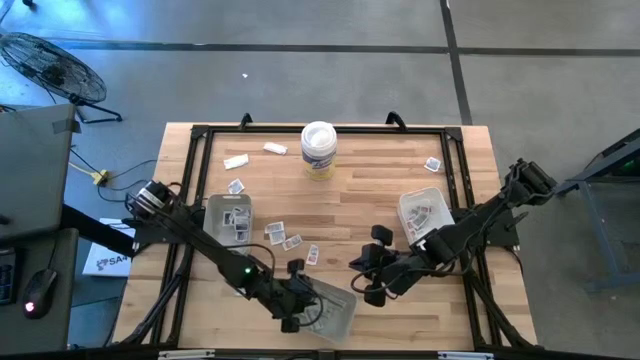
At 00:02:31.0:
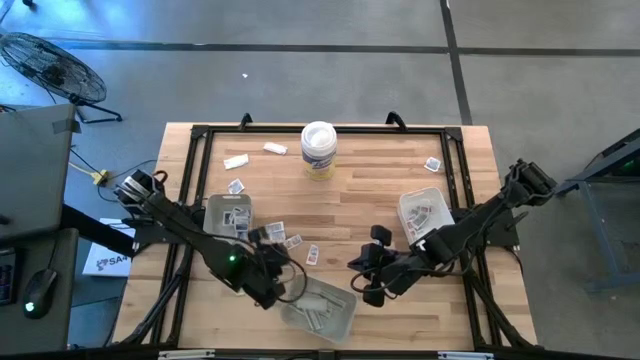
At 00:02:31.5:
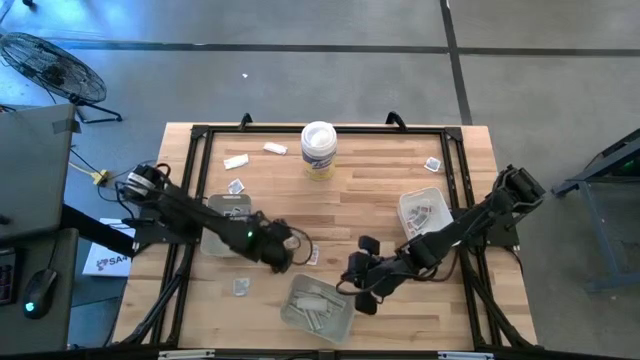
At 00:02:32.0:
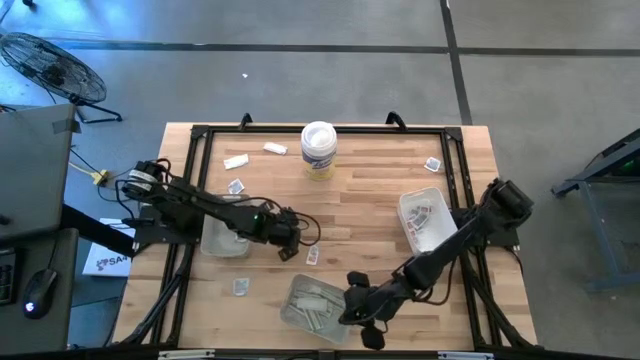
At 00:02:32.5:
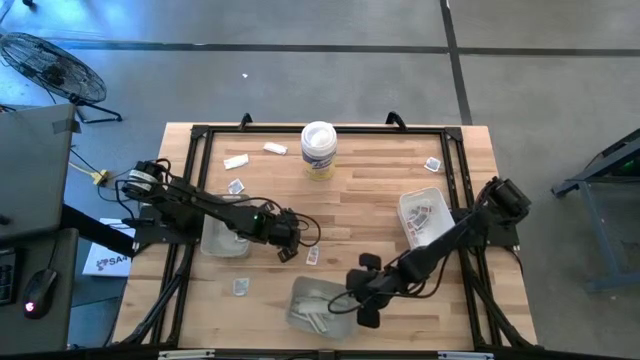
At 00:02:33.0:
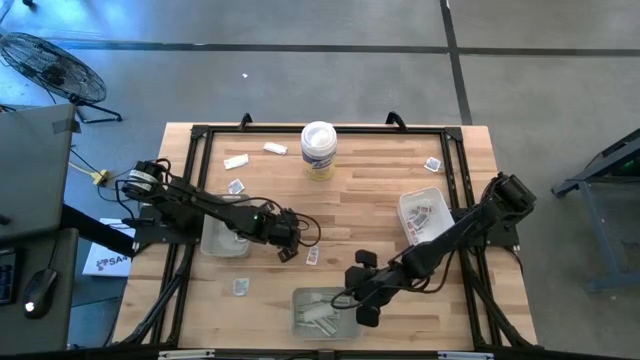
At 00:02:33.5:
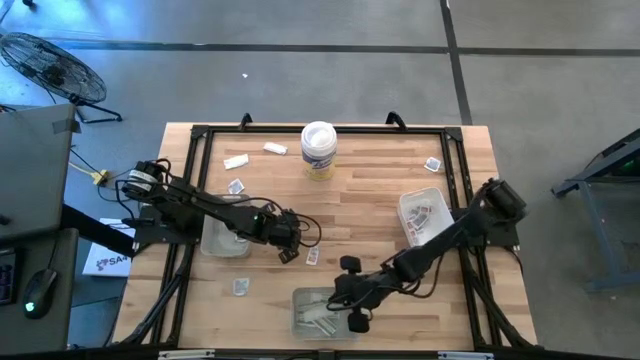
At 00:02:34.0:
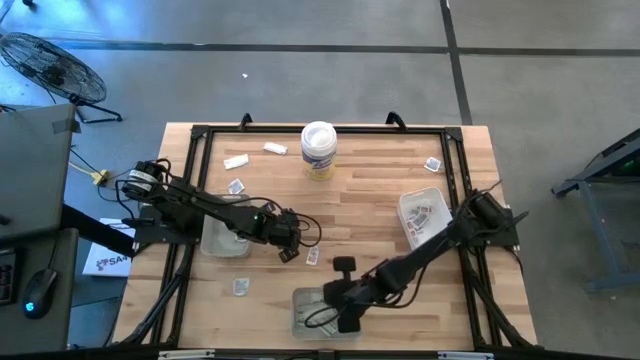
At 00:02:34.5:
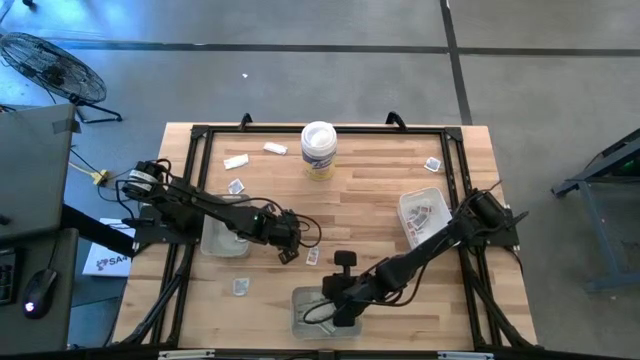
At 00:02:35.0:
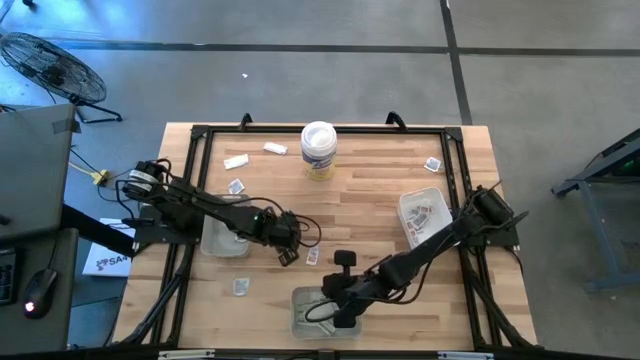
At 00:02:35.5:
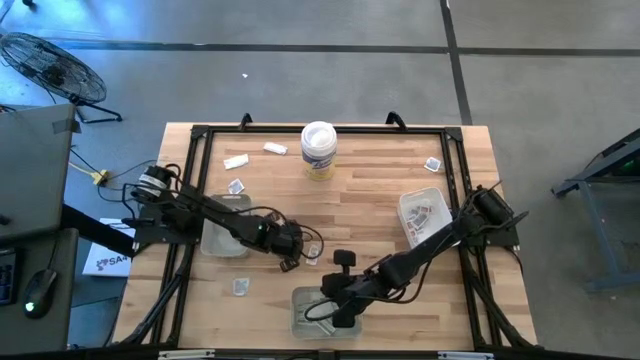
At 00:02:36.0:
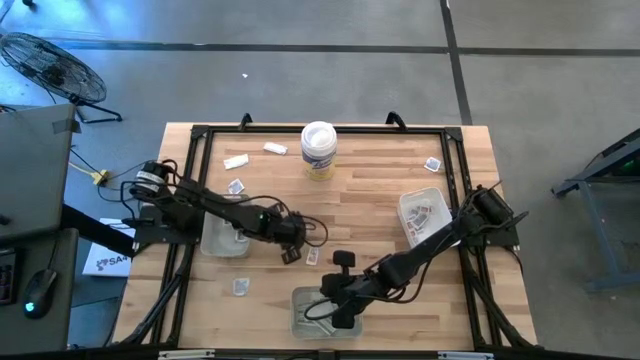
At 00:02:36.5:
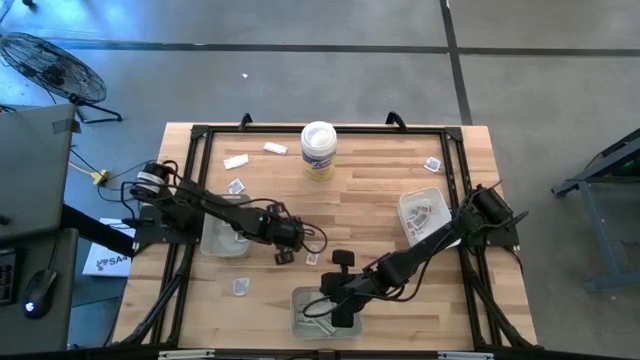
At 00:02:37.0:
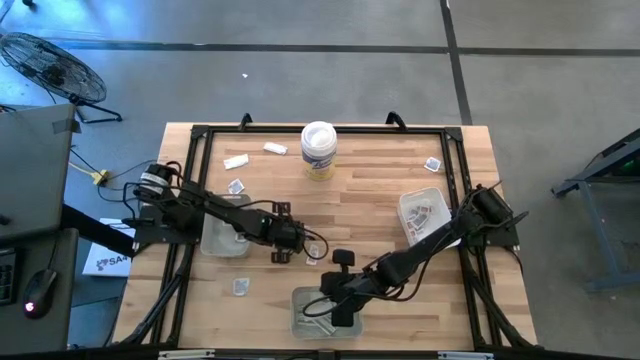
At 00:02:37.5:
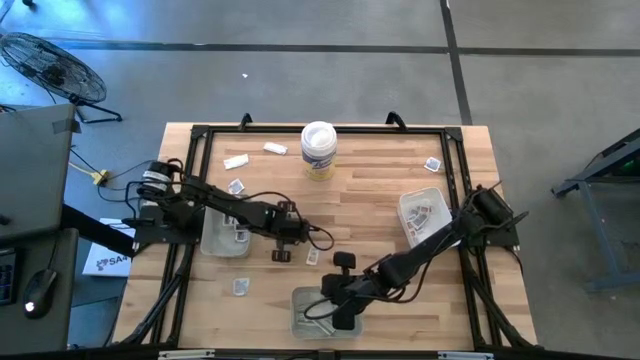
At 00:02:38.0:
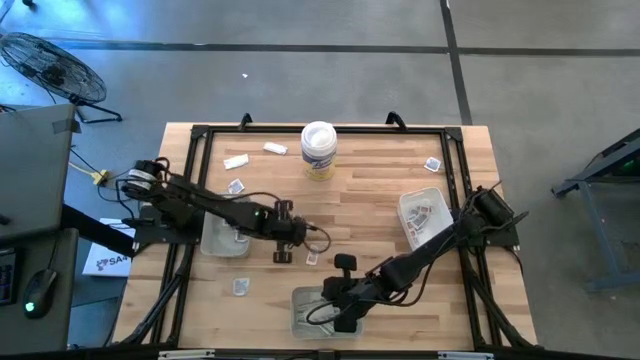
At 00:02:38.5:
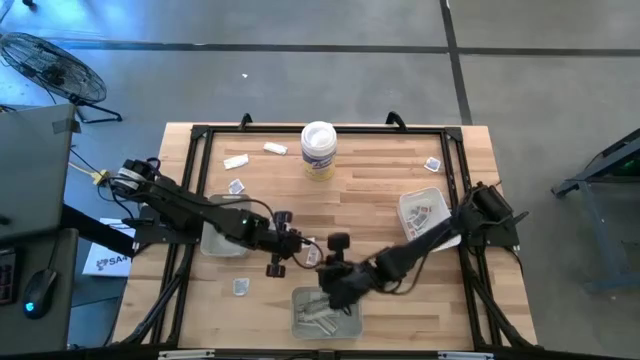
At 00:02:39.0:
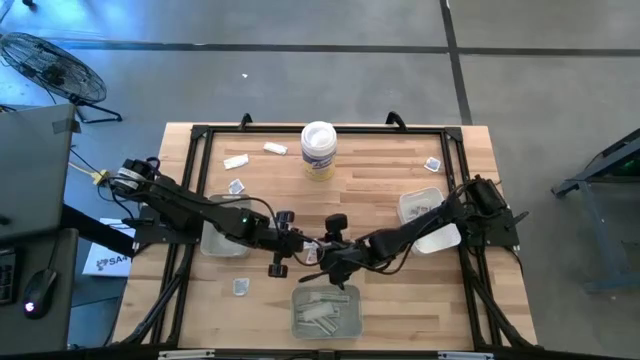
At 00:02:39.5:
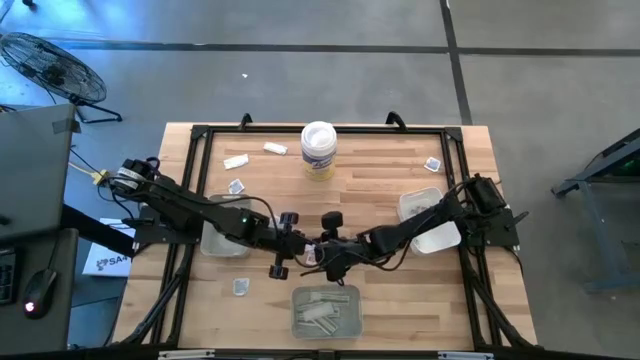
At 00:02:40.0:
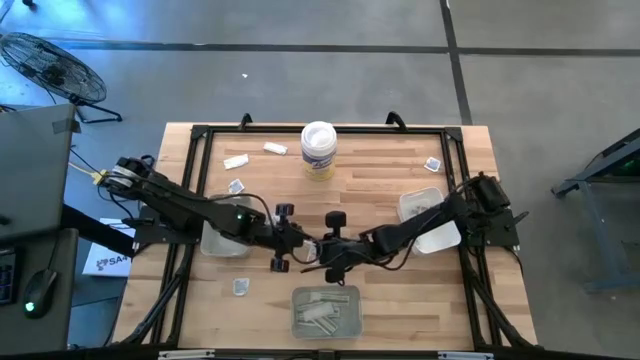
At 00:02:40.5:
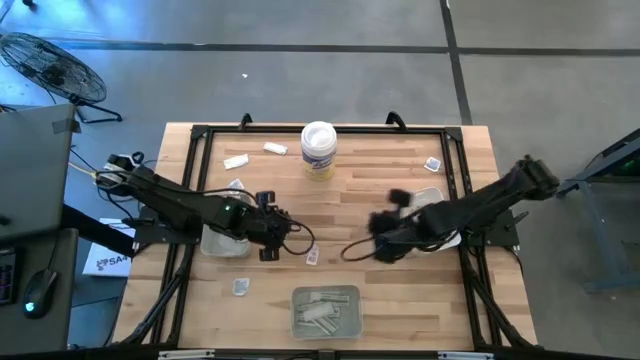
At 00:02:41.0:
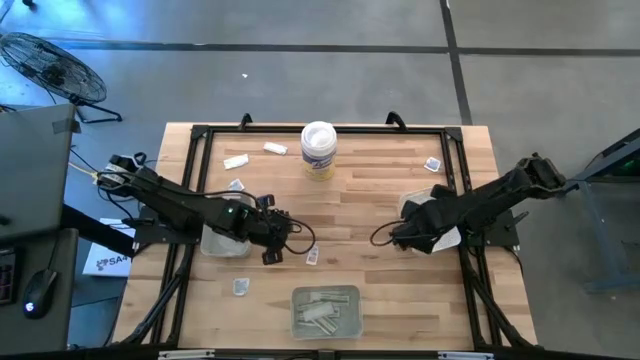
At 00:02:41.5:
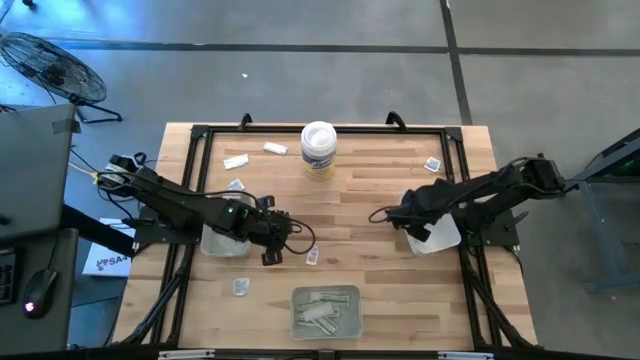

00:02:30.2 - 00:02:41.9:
Task: Pick & Place First Aid Supplies
Put the orange ointment pack into the white bin

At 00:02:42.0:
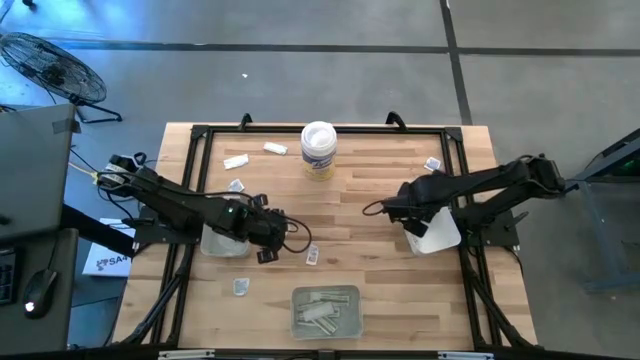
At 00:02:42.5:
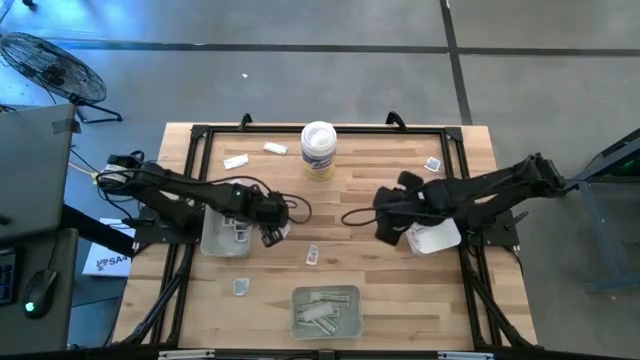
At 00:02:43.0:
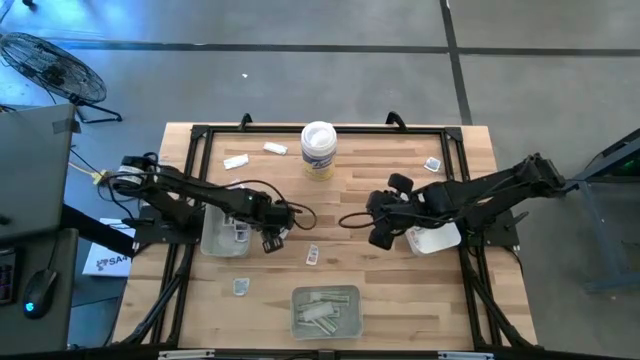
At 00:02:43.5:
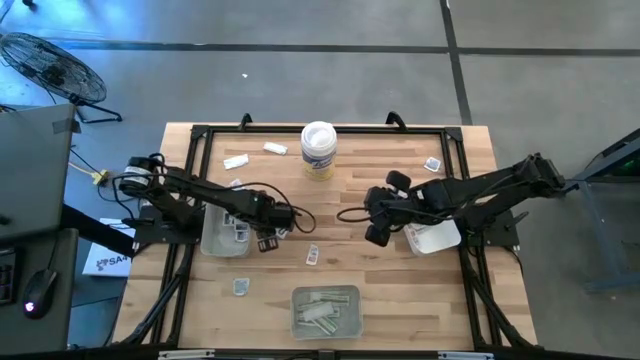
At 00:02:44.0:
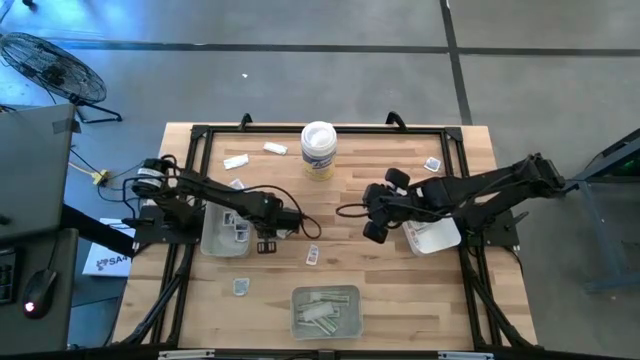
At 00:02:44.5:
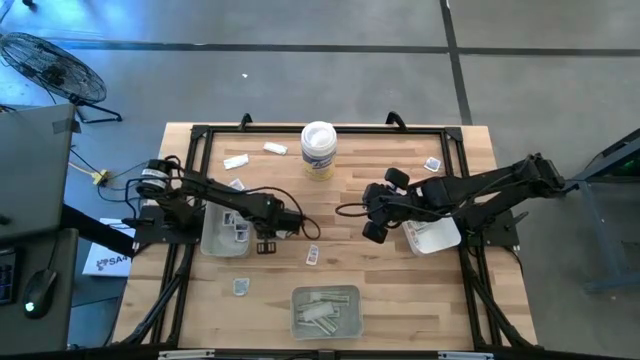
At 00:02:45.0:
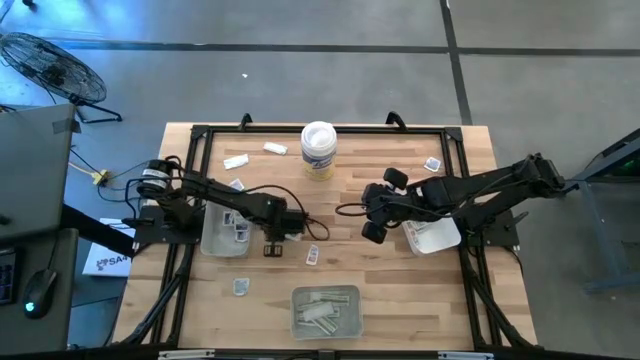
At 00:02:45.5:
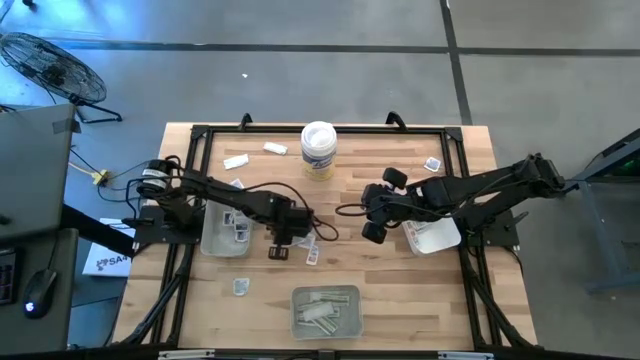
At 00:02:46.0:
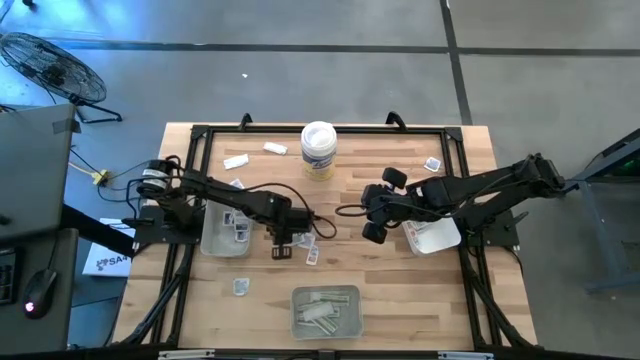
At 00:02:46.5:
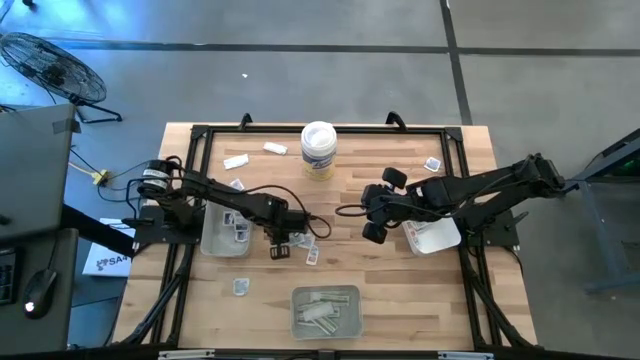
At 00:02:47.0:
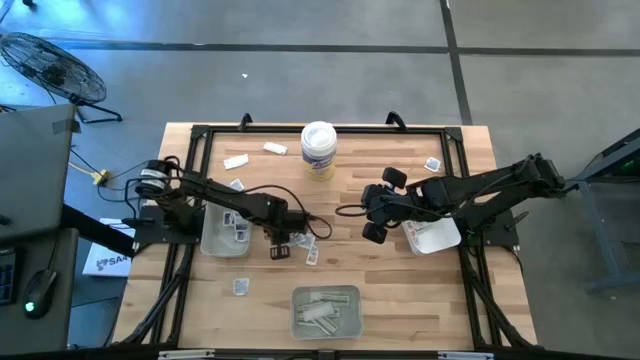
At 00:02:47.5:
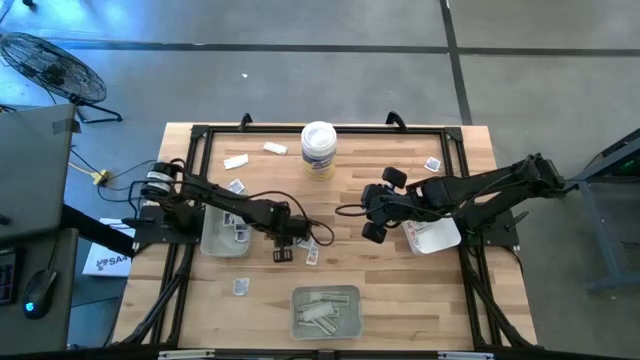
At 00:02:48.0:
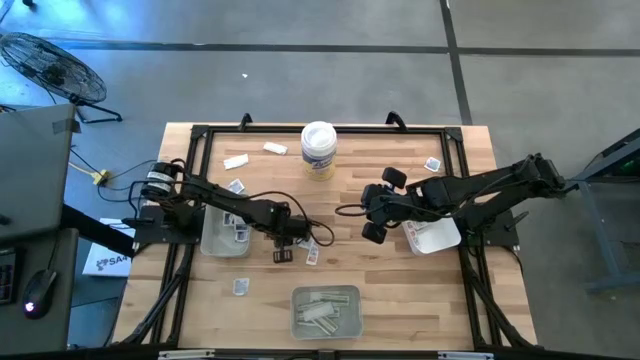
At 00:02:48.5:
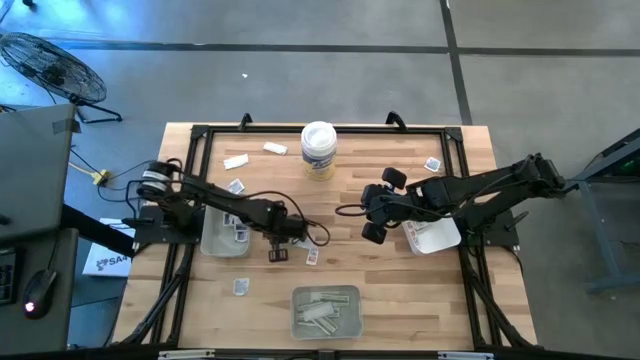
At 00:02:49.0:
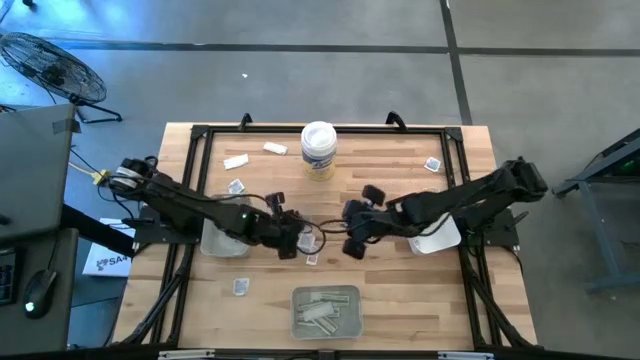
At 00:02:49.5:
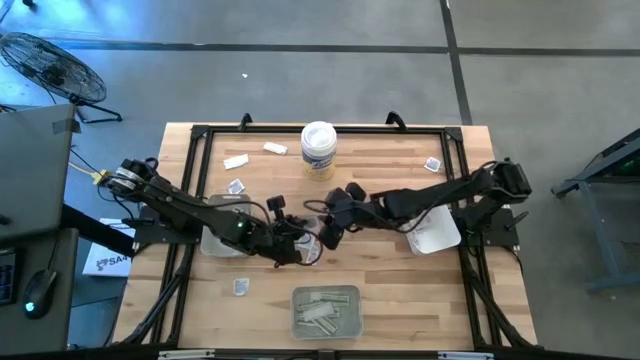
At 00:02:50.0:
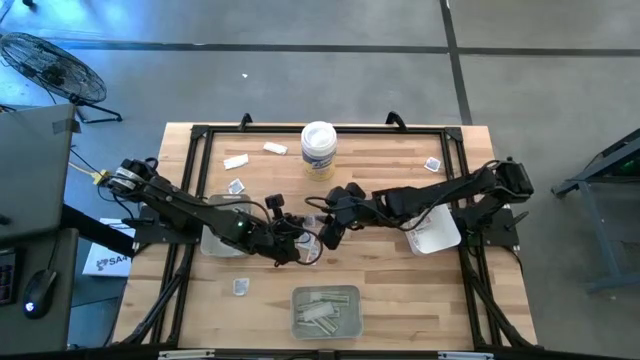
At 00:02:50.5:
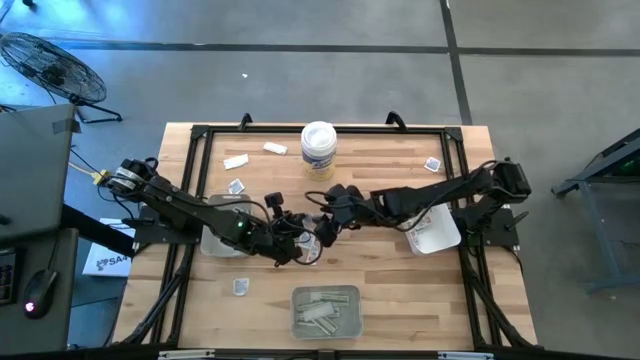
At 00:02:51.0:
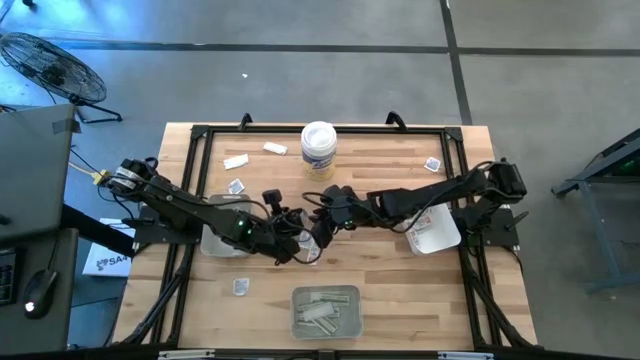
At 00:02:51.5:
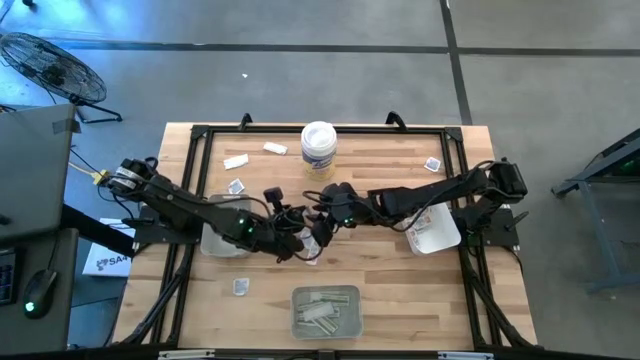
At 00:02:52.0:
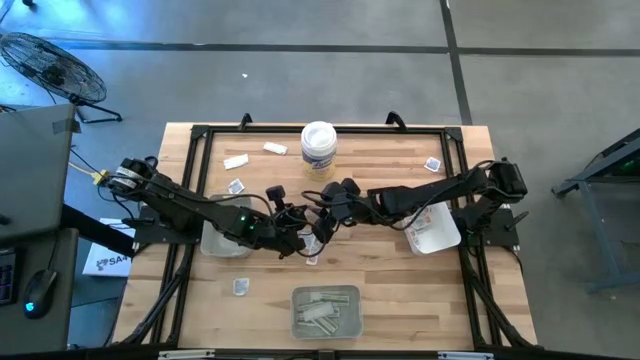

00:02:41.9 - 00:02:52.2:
Put the orange ointment pack into the white bin
